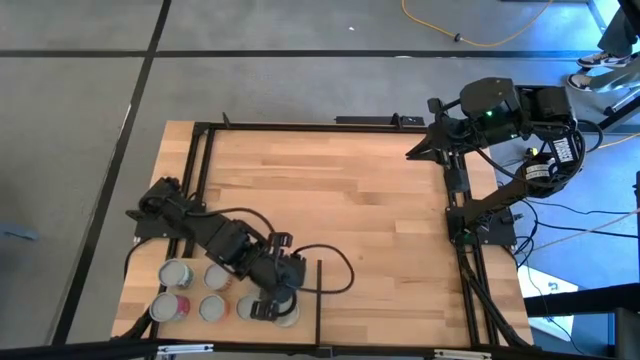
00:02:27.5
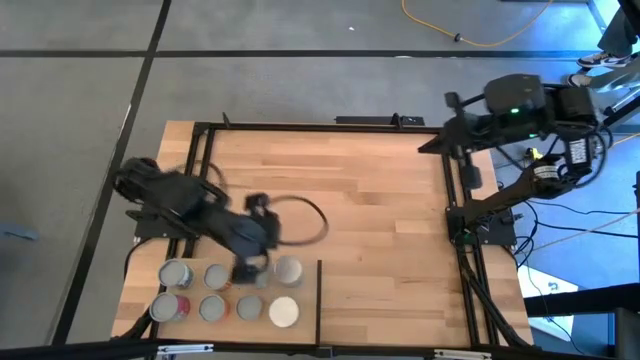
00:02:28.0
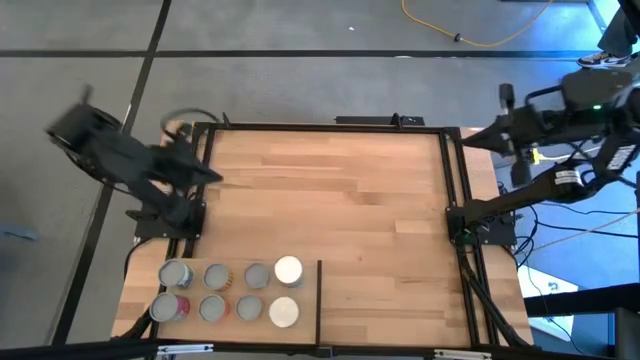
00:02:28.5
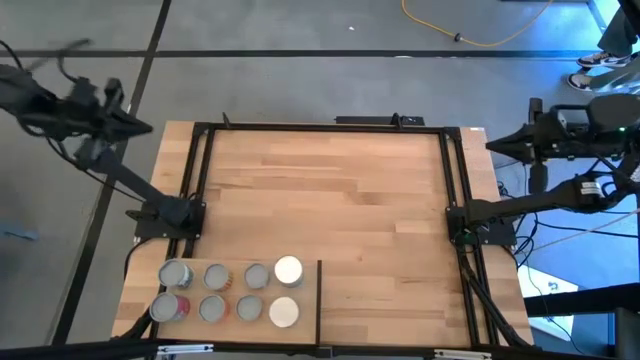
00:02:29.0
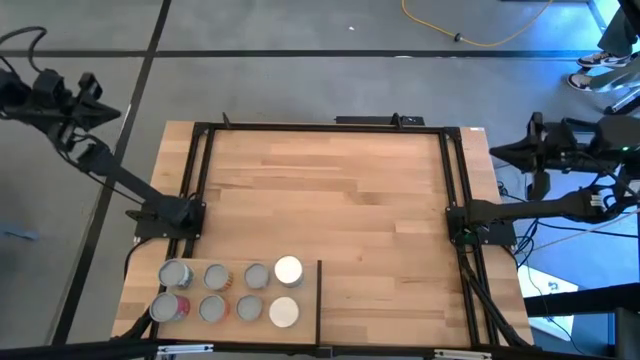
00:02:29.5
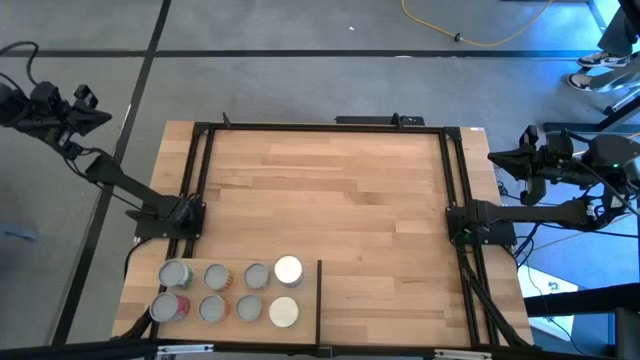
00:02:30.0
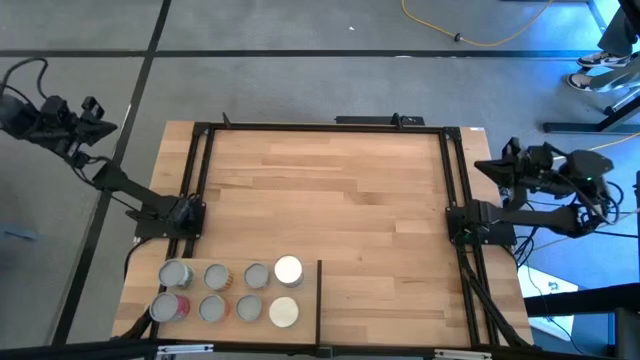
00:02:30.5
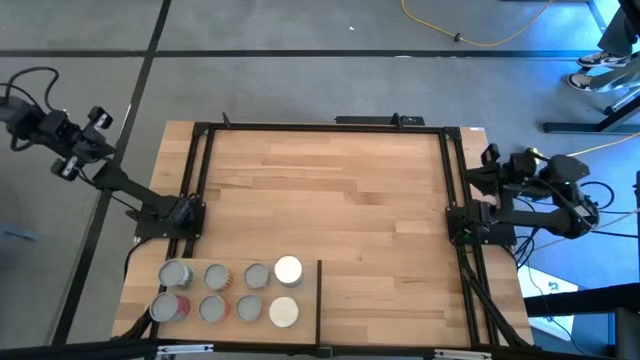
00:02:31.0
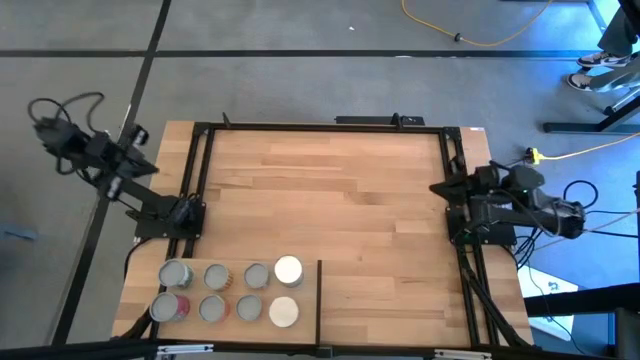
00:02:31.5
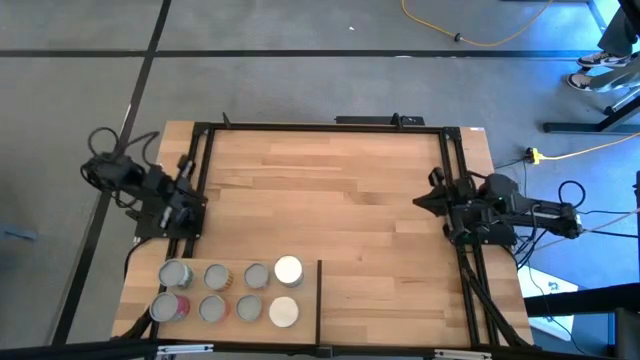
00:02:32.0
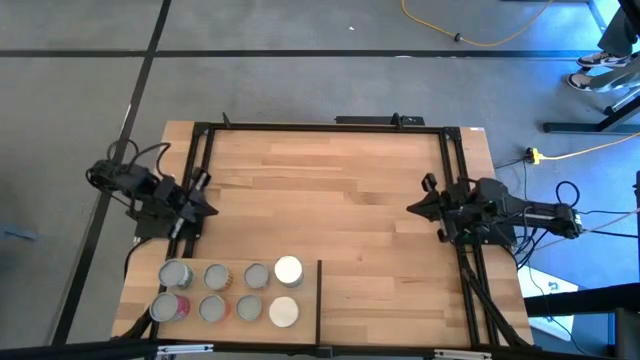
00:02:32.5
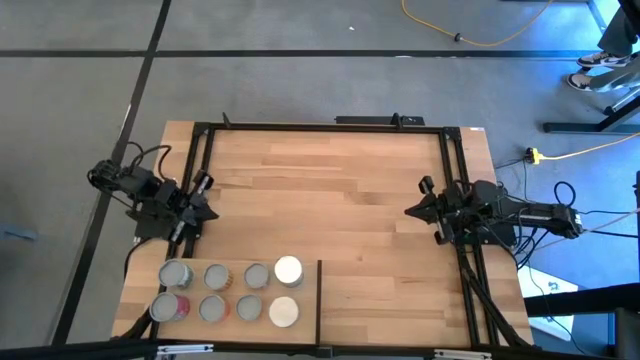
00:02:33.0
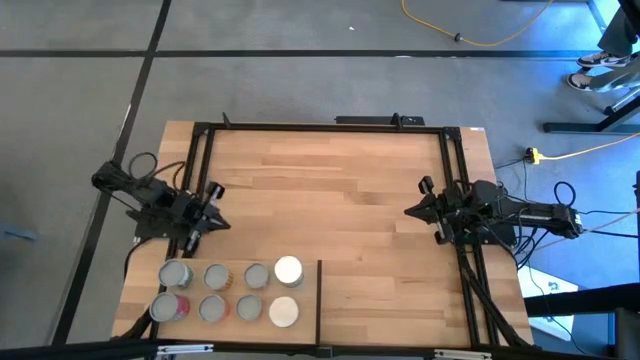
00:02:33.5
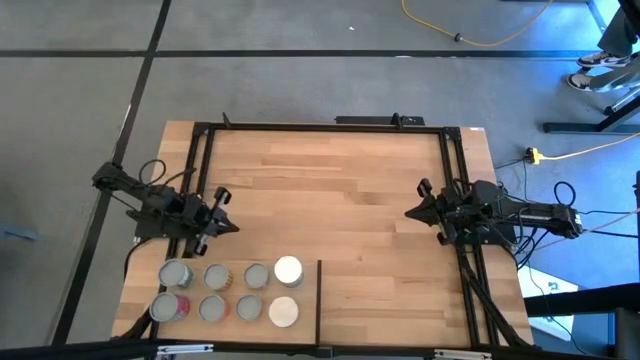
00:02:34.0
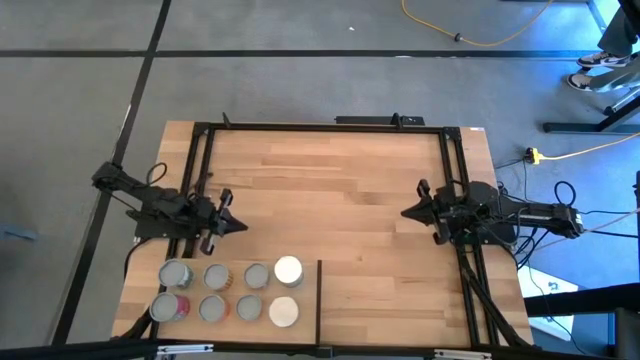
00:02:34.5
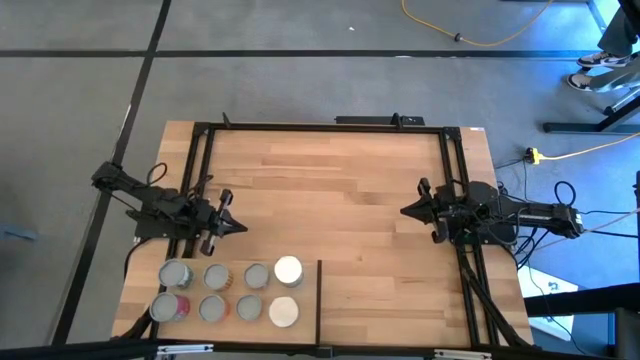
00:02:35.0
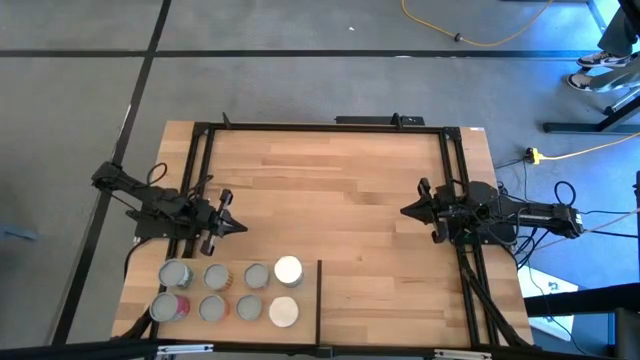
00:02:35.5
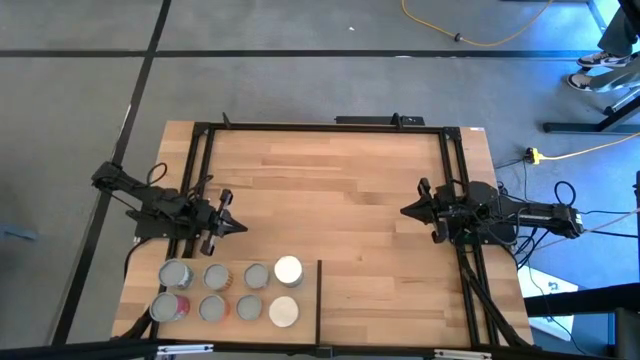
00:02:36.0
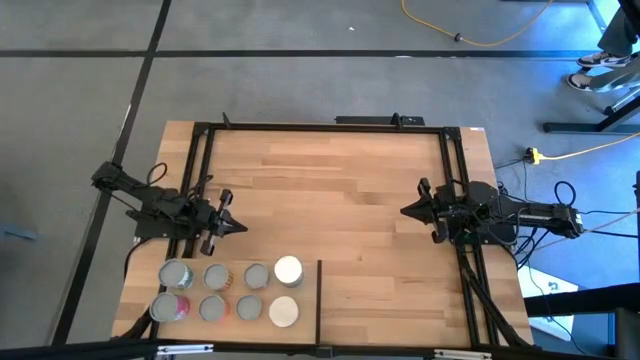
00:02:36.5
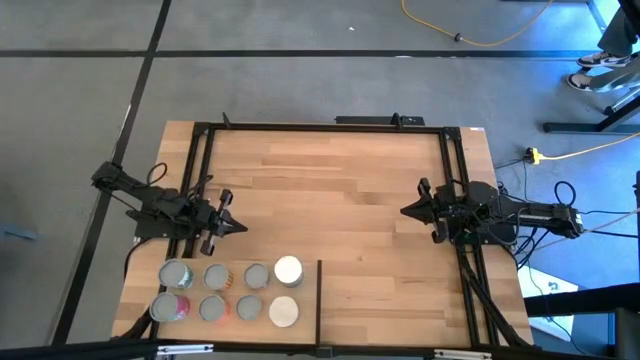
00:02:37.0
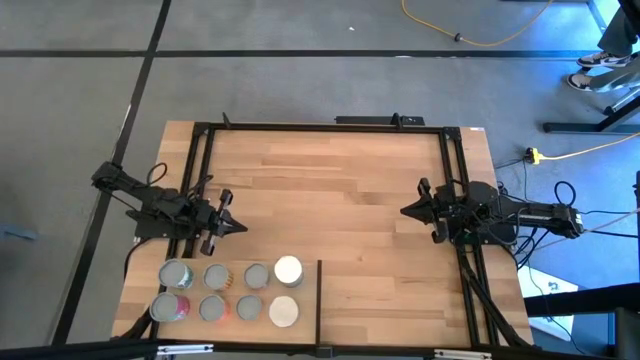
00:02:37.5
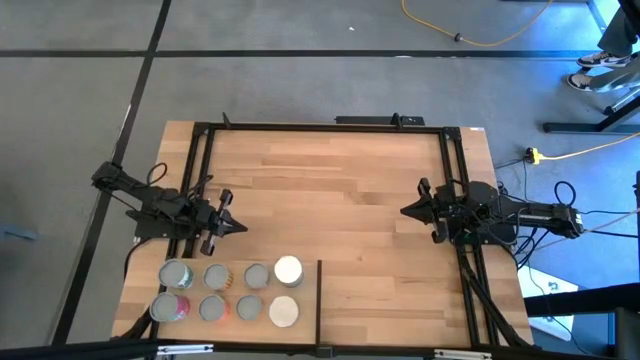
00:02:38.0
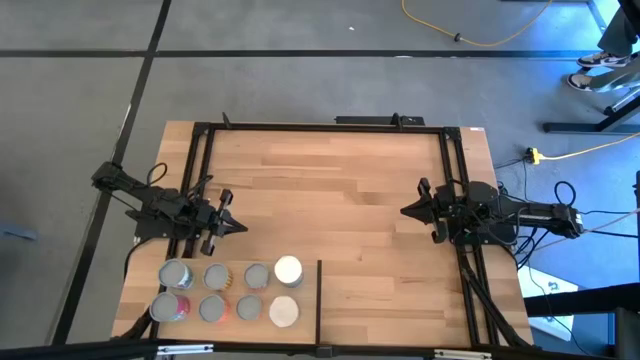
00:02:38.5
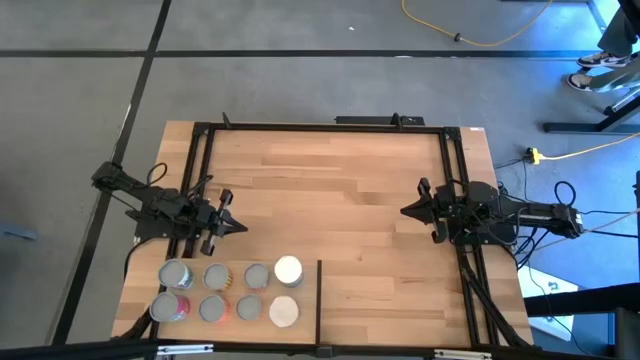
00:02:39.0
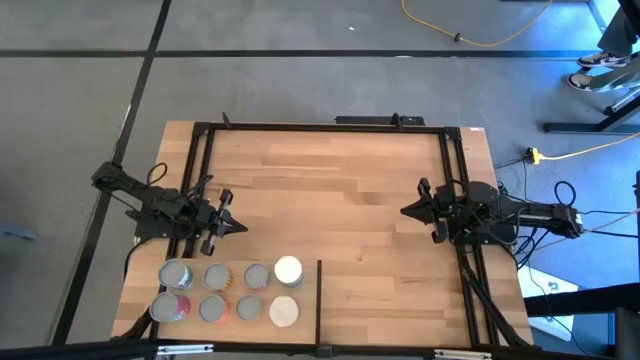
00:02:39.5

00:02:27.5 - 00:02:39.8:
Task: Pick and place cans onto a shelf
Return to home position

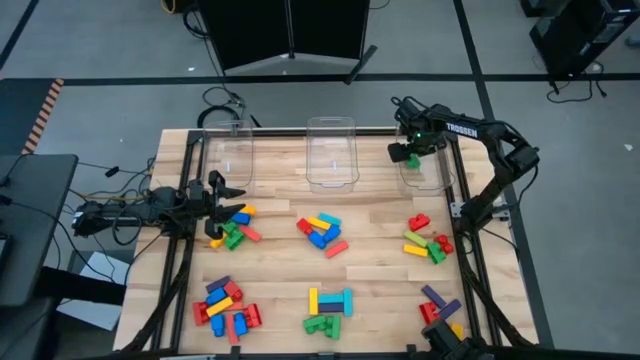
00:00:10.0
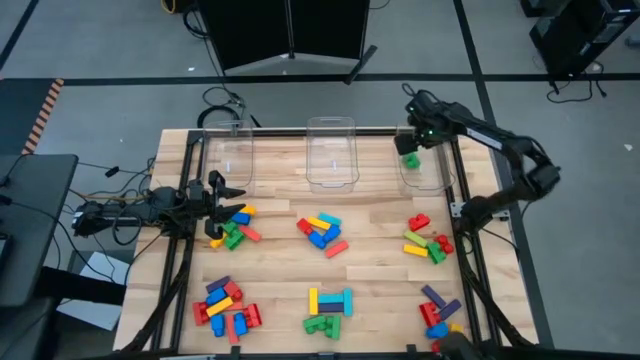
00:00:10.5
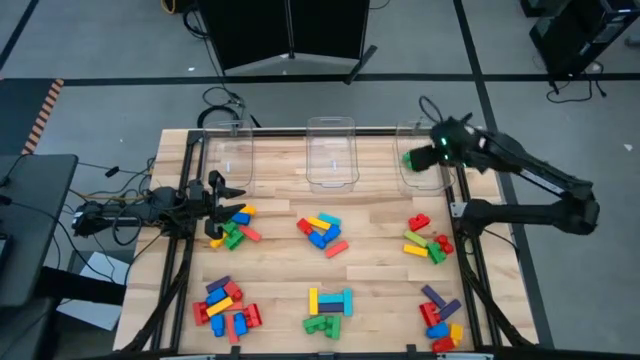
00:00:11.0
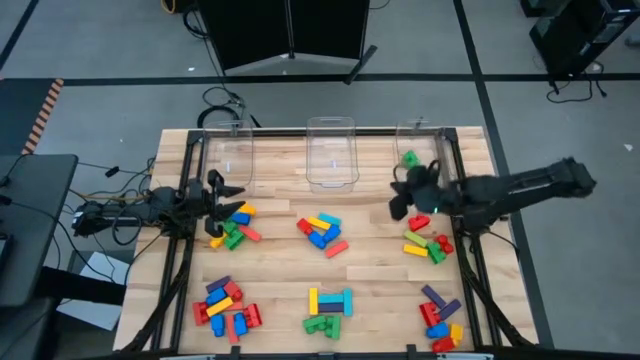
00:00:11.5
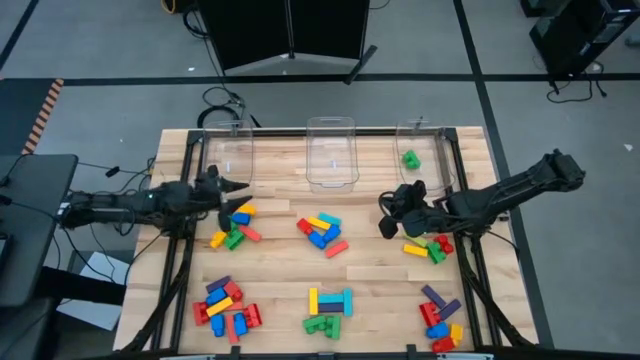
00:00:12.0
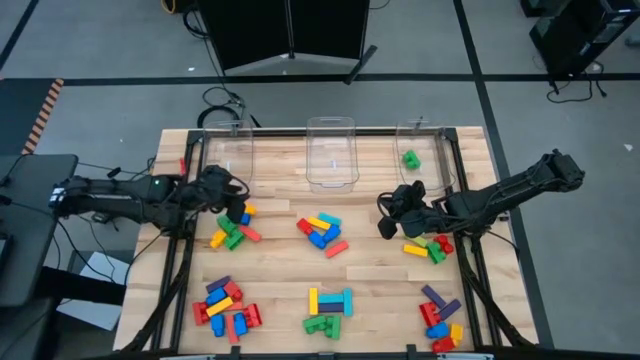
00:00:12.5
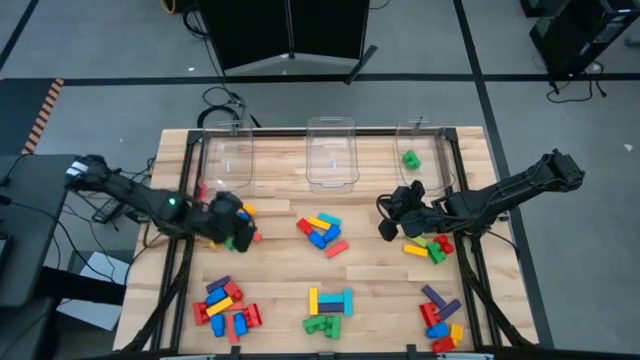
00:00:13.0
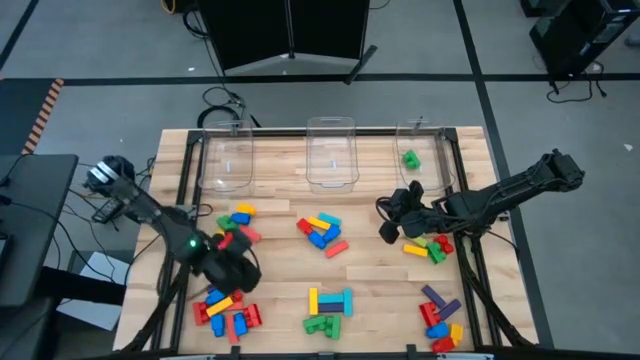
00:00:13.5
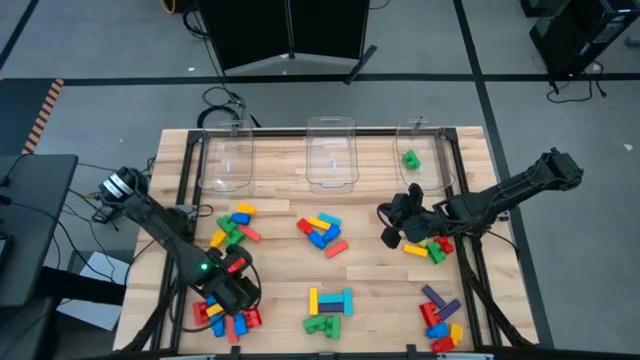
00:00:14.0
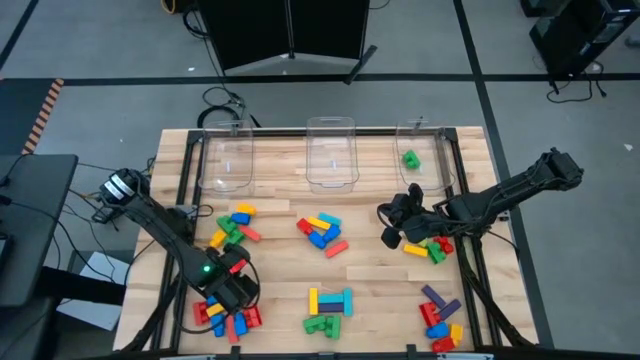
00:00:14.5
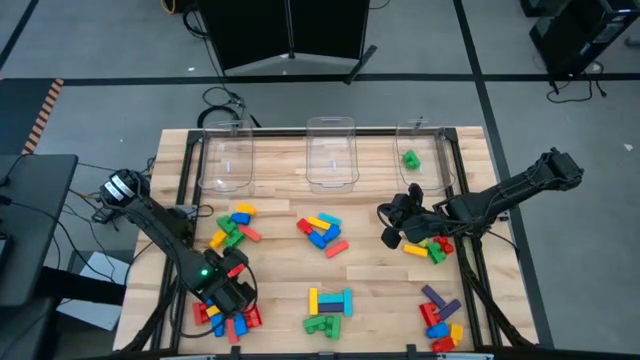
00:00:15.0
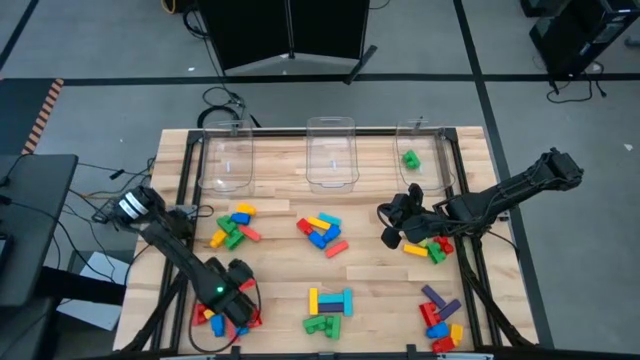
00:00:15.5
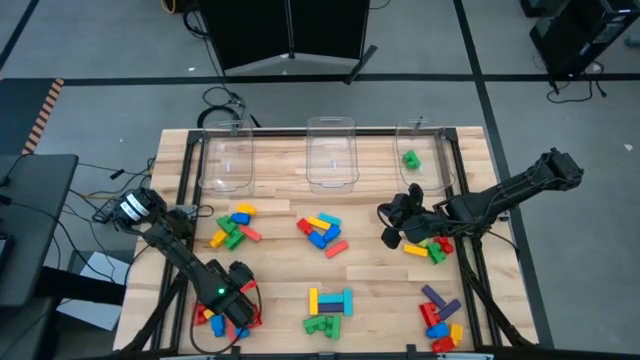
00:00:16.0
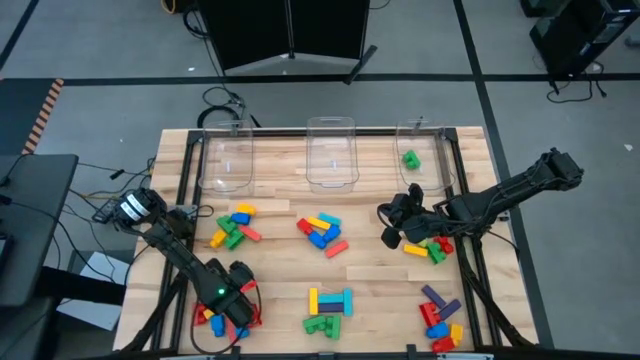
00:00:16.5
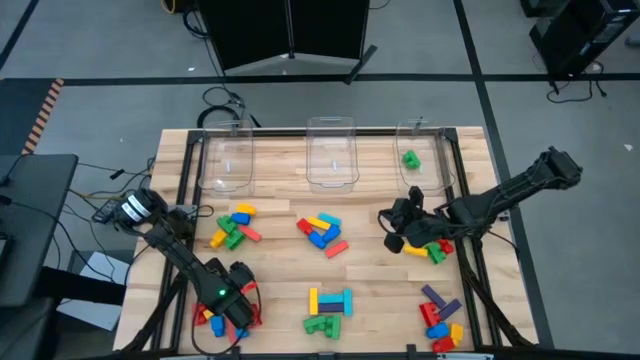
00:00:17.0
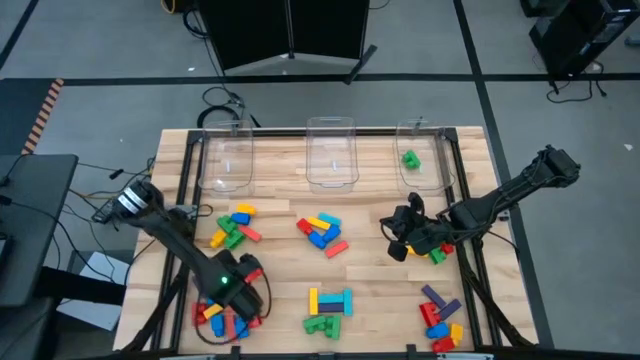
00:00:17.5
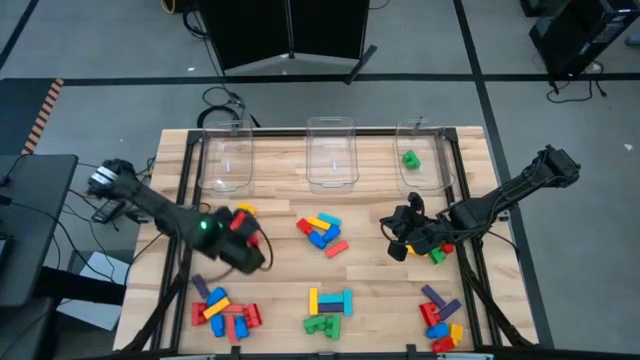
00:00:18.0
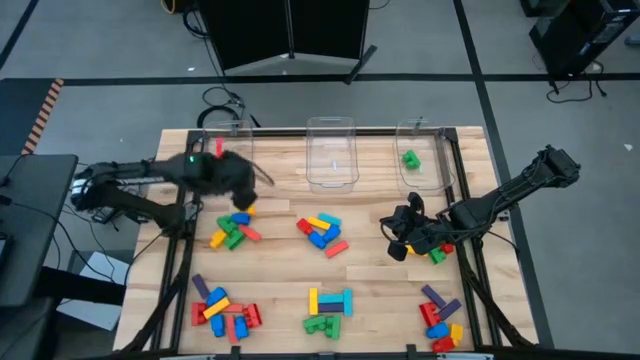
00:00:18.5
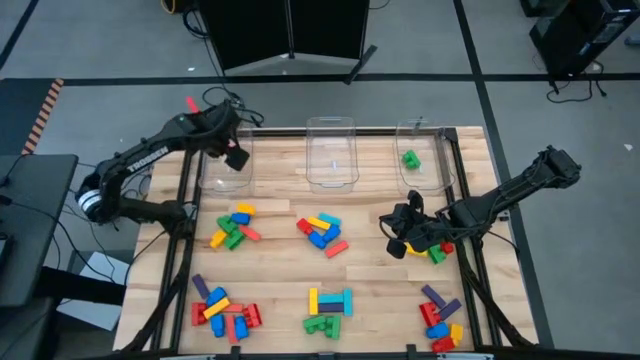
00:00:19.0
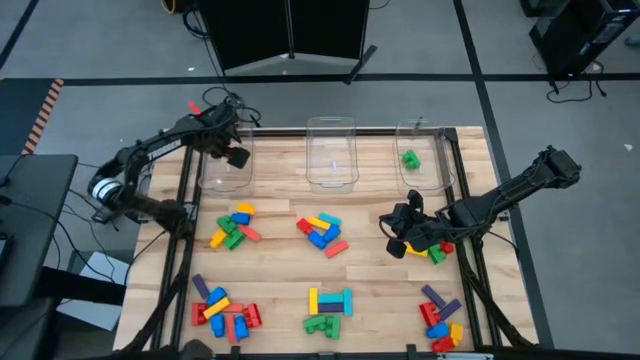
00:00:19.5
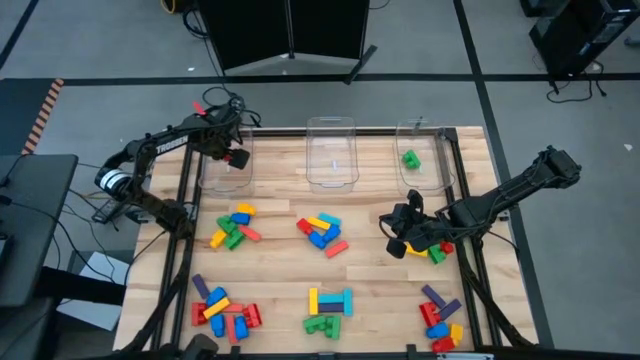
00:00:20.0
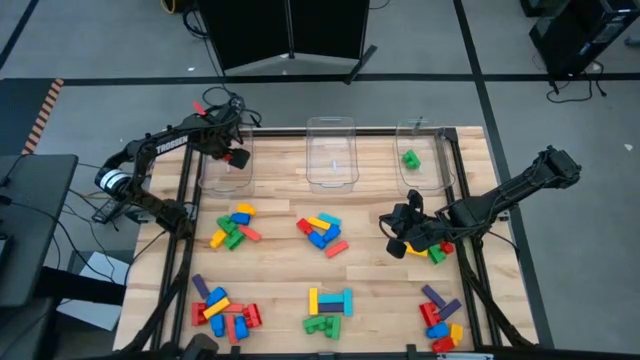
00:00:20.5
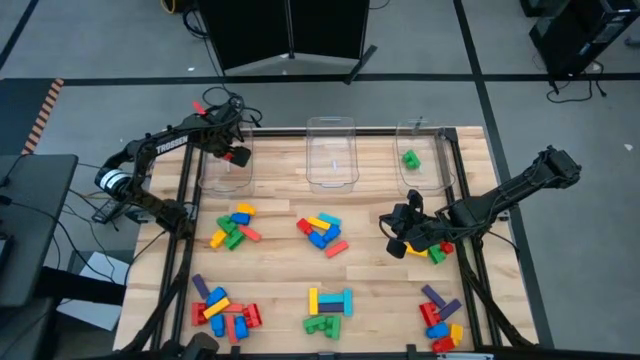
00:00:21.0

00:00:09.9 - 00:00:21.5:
Task: Sort blocks by size
Put the red 1 stud game piece into the left transparent bin
